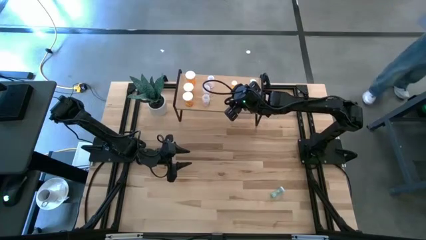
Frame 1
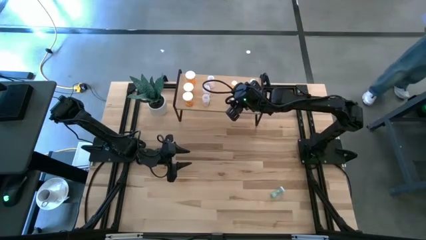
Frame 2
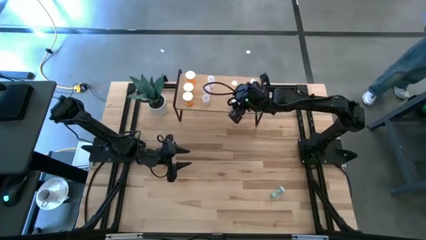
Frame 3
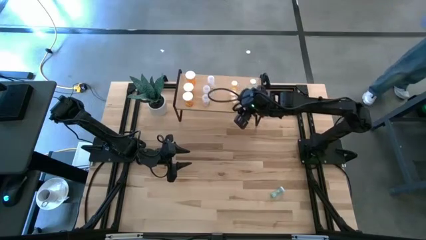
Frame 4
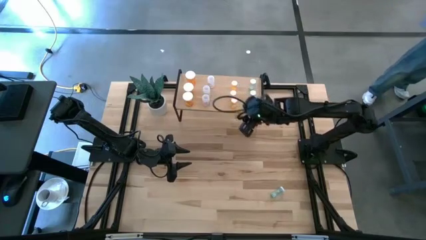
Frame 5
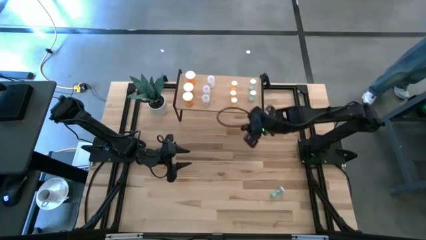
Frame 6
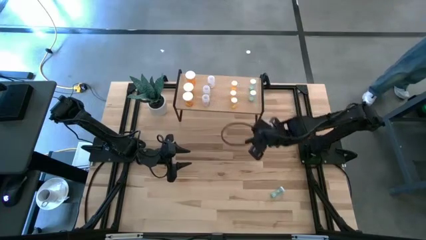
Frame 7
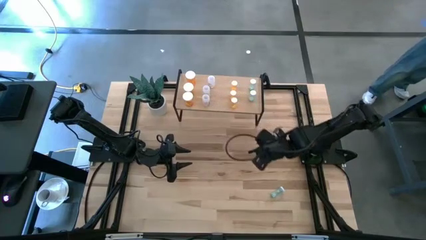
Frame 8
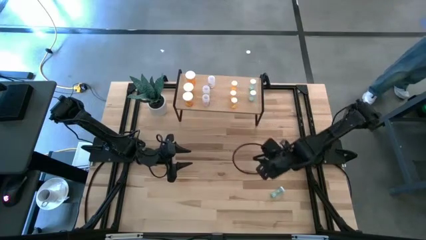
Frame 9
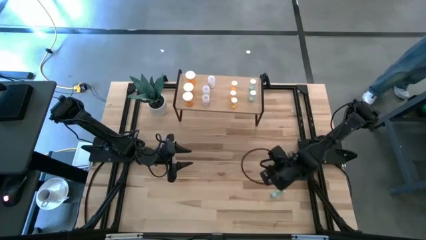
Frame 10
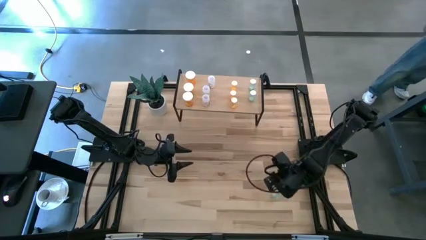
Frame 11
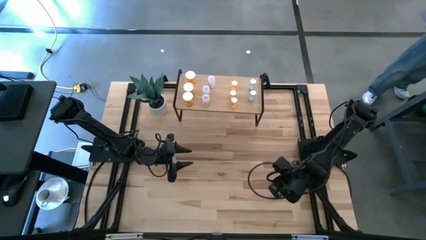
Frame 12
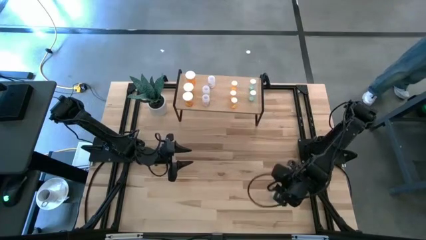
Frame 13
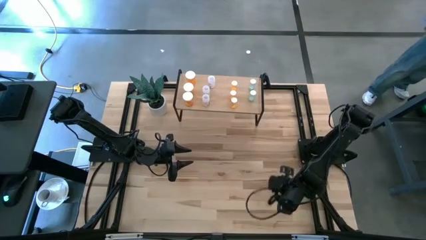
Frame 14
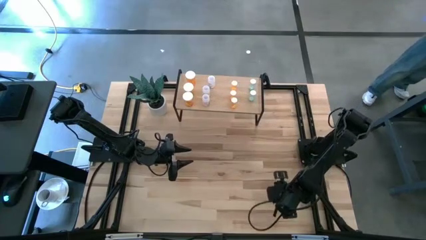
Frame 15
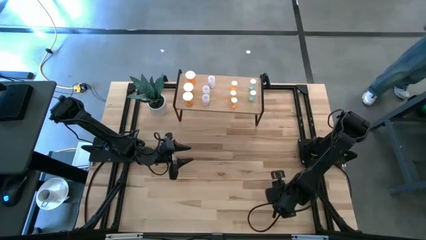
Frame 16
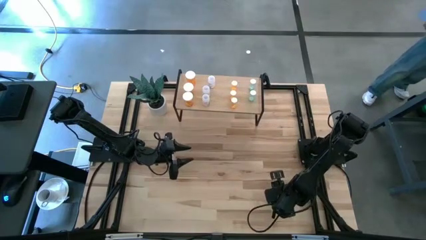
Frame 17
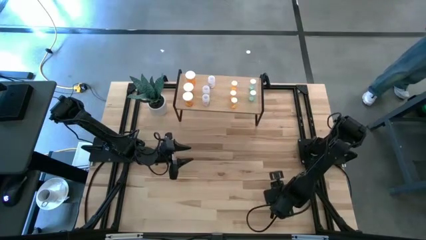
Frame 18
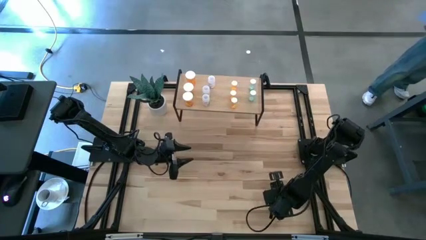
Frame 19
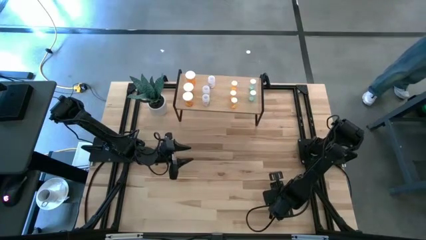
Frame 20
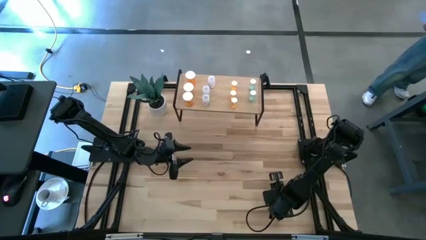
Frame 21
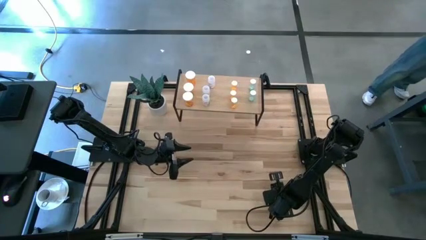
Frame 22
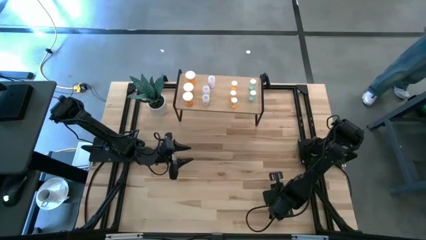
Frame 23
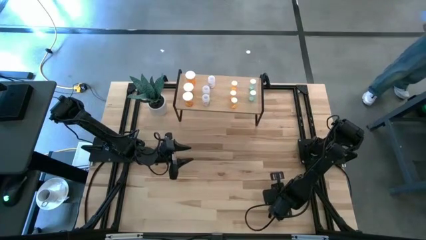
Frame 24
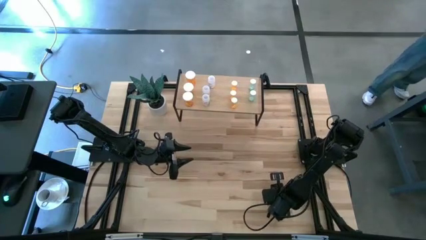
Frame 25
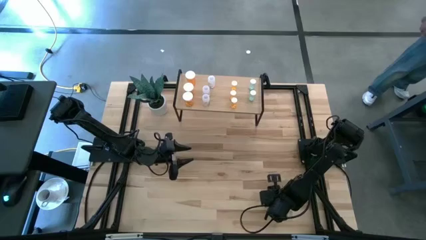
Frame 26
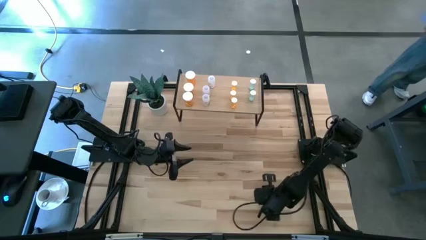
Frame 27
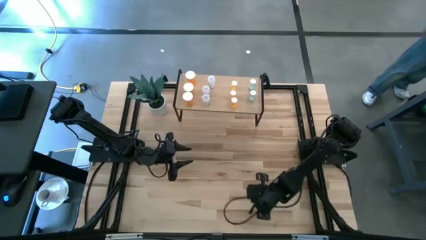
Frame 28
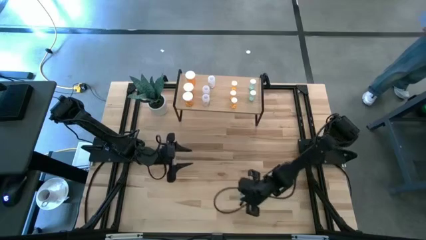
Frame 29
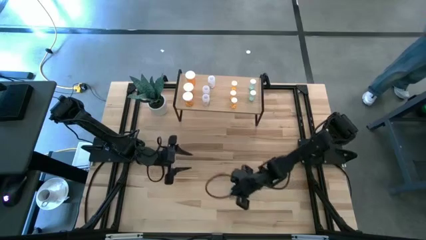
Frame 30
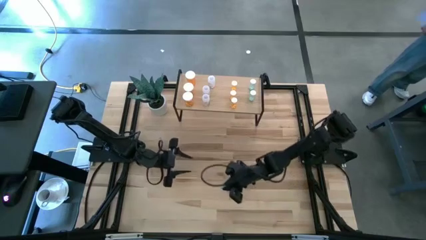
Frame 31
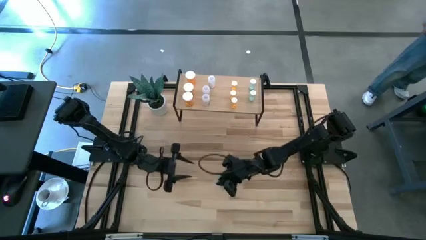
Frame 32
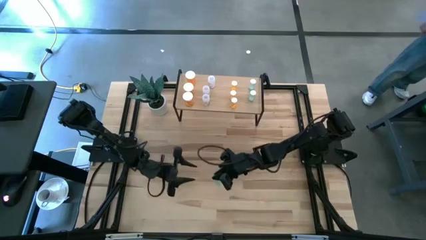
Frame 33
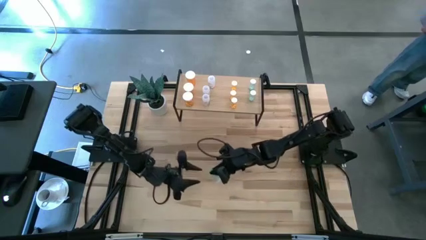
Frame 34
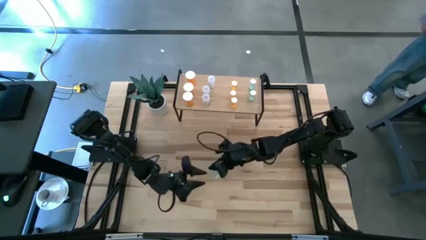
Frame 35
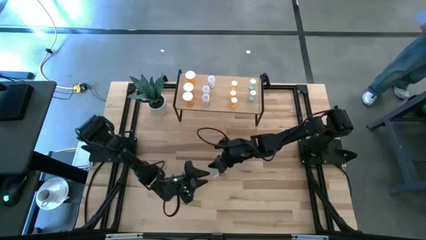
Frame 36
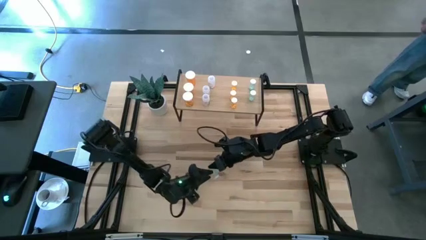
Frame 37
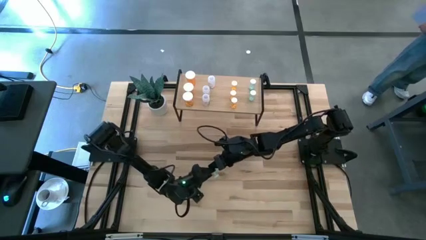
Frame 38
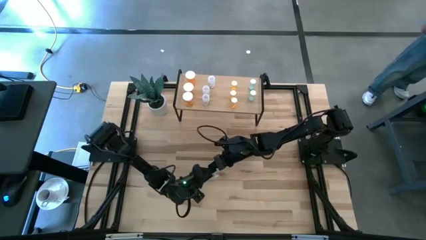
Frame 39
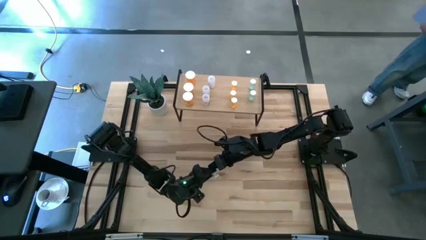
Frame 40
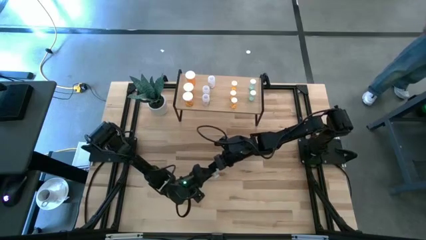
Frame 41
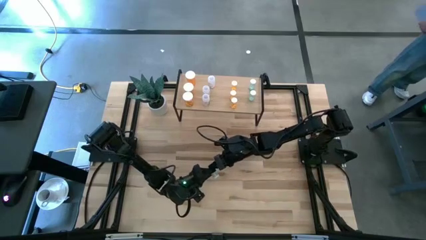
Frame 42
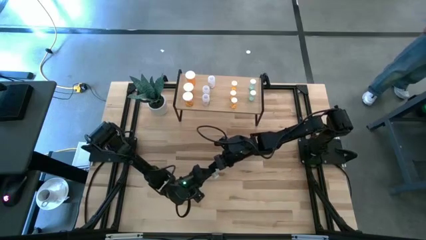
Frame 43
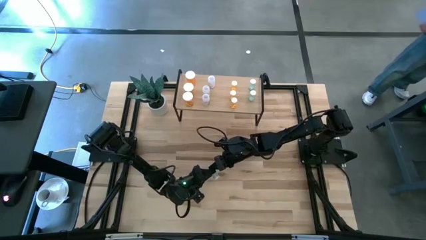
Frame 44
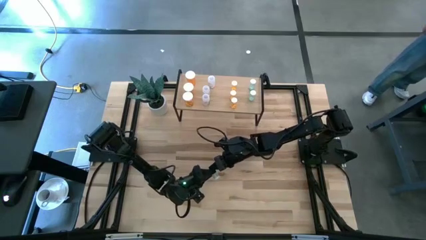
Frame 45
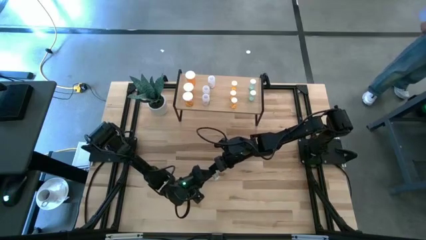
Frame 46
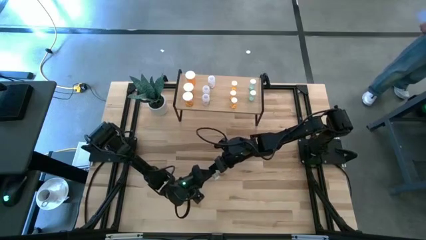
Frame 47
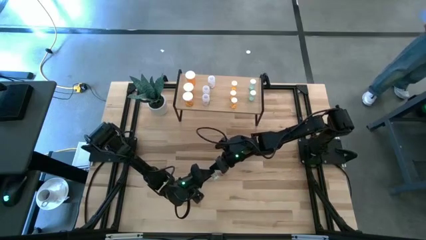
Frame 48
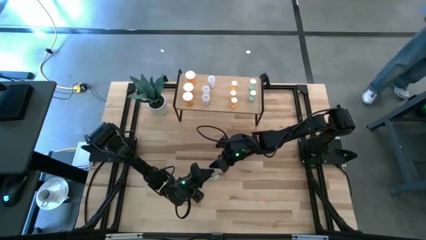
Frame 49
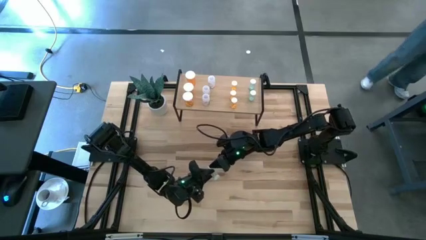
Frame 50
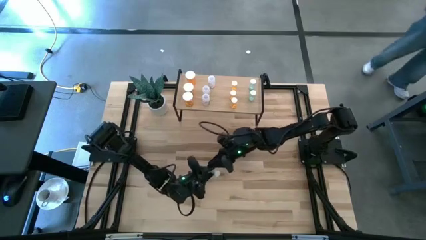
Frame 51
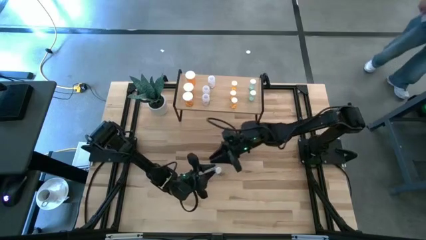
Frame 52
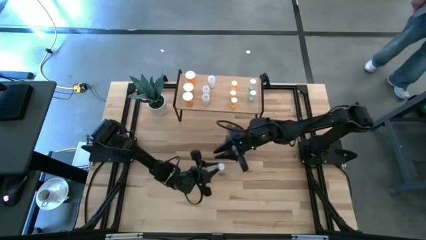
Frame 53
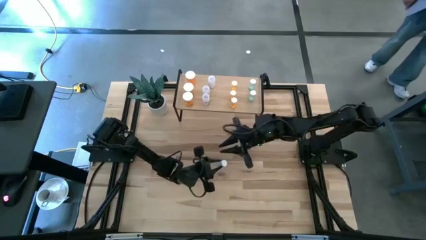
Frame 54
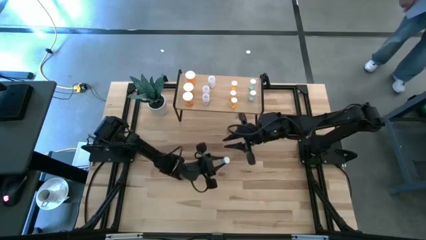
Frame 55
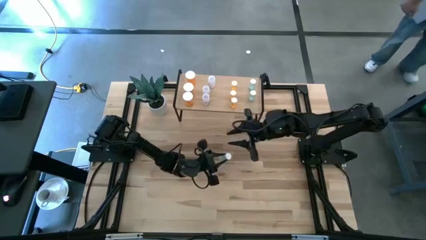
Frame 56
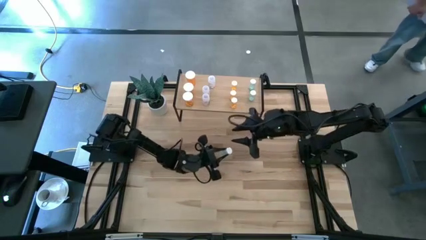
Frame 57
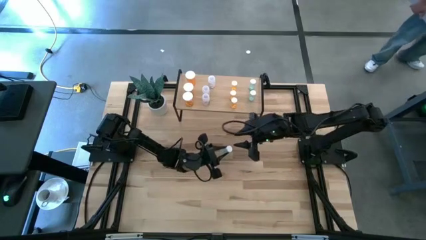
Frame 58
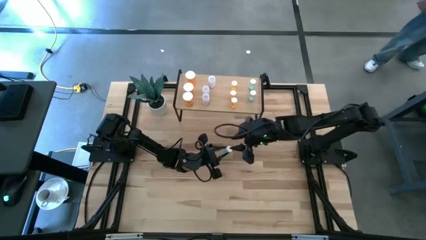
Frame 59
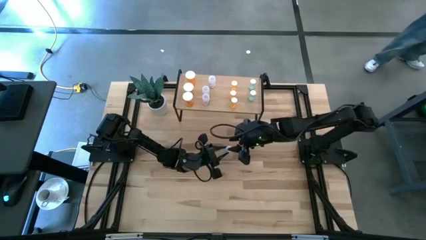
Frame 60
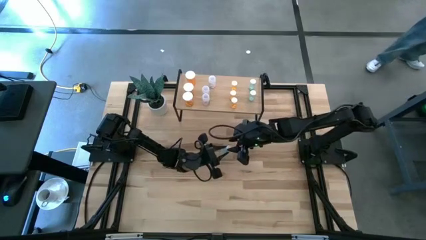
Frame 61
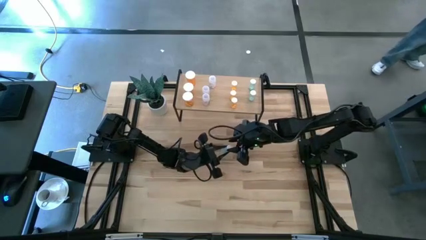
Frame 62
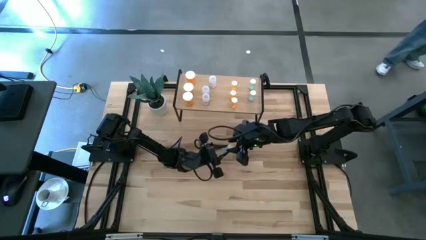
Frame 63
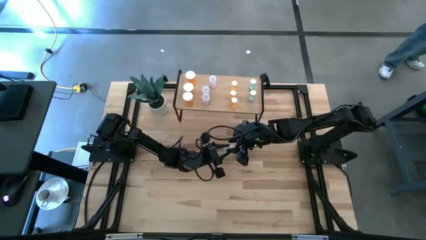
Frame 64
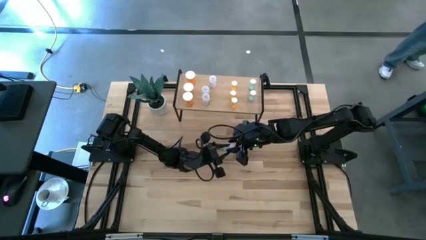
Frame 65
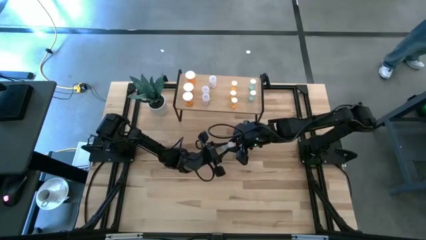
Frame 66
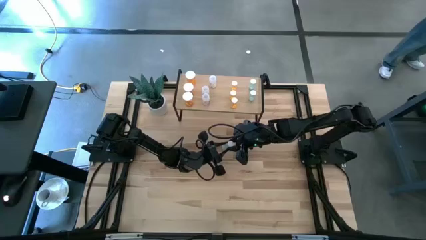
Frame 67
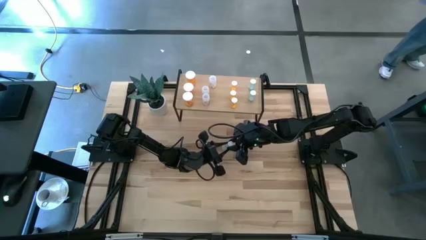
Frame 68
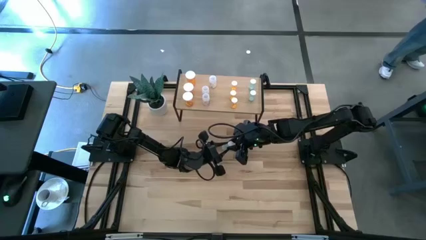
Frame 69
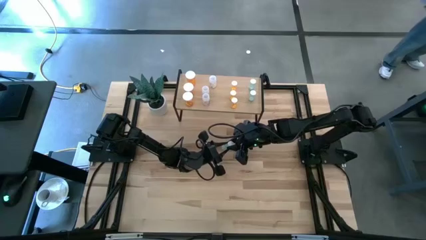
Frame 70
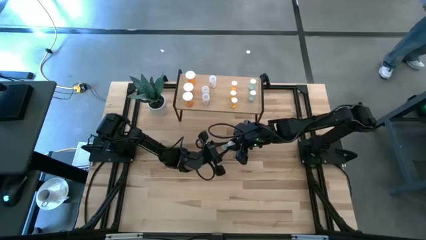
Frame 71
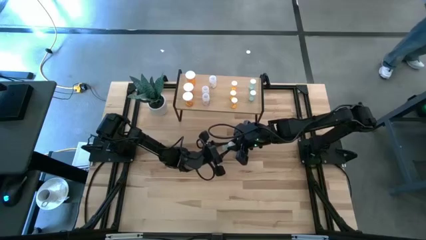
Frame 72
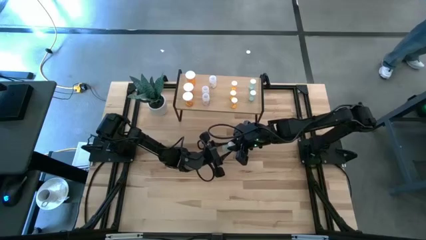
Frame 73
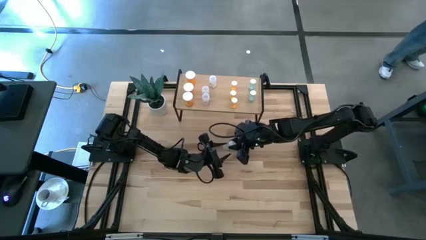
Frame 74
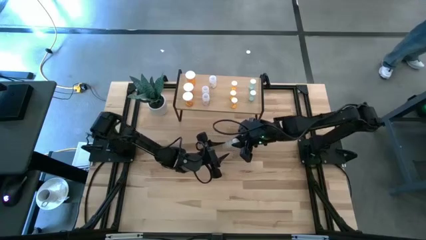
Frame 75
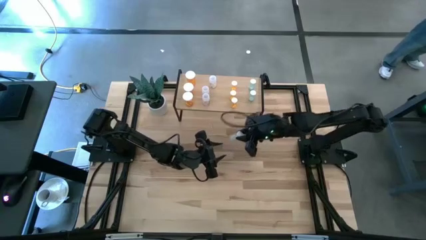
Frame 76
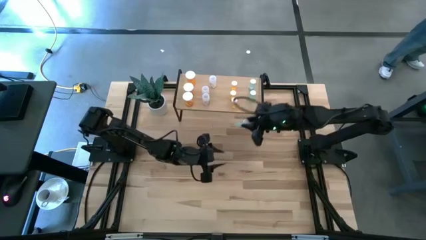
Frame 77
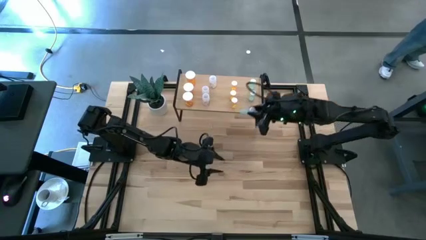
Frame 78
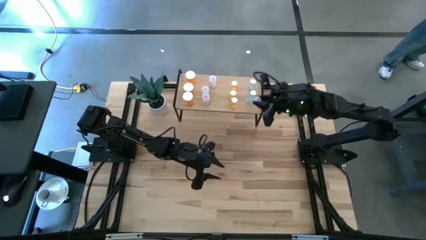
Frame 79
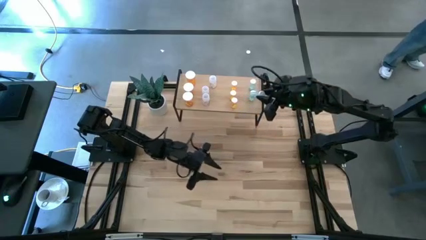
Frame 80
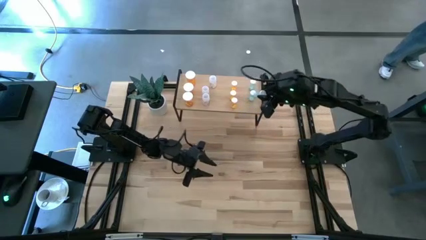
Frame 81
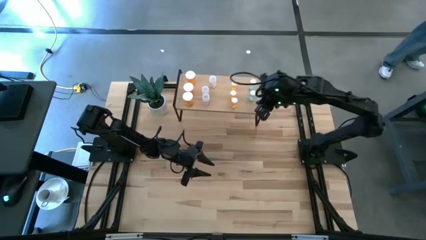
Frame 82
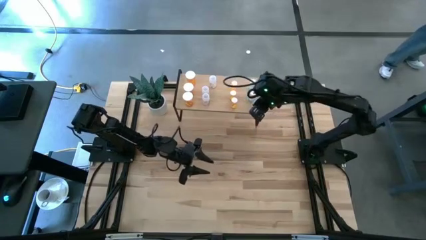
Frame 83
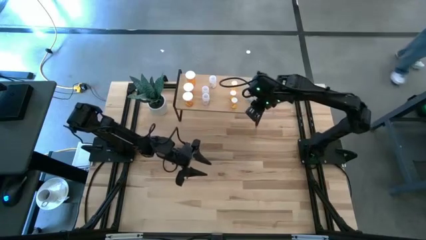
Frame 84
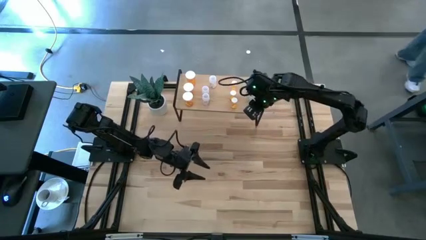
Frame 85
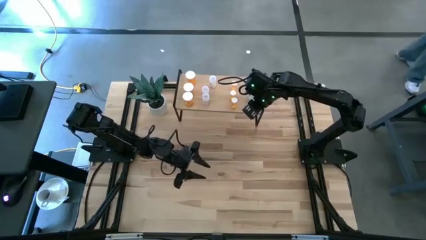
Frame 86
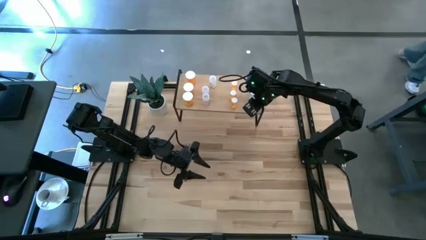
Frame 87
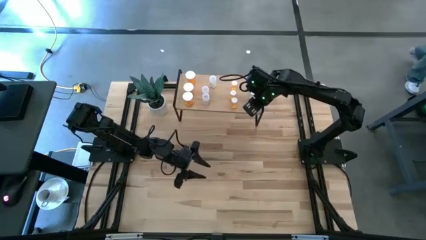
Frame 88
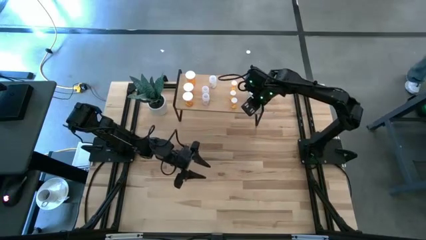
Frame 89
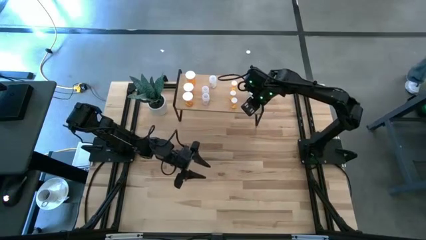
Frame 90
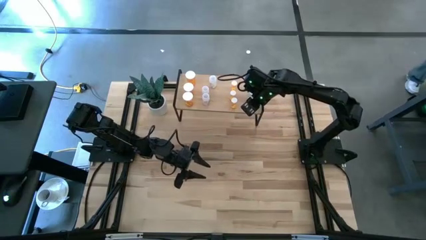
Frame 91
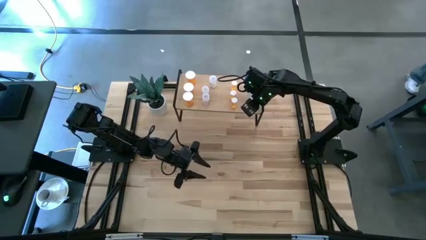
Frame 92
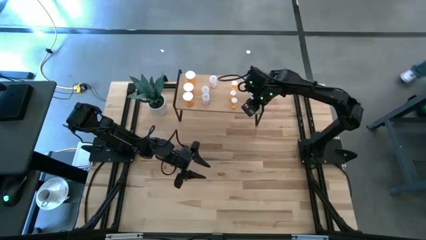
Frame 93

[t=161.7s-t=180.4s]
Task: Pick and place medicine bottles onto shelf by color
Put the green pill bottle aligned with the other green pill bottles on the shelf
